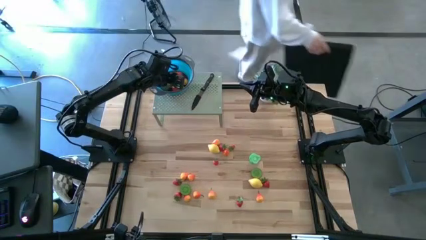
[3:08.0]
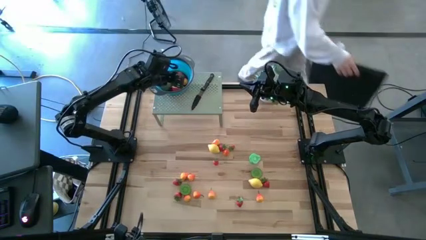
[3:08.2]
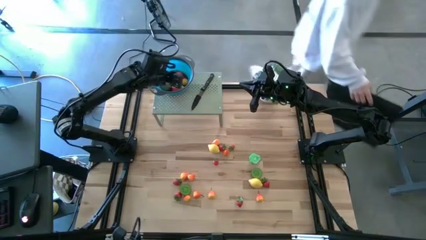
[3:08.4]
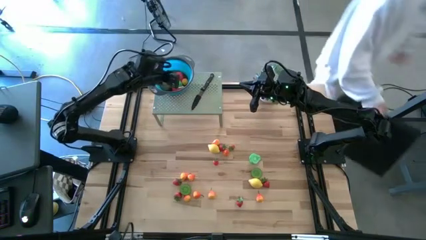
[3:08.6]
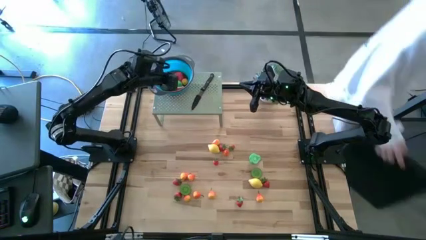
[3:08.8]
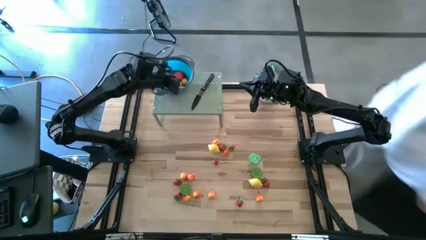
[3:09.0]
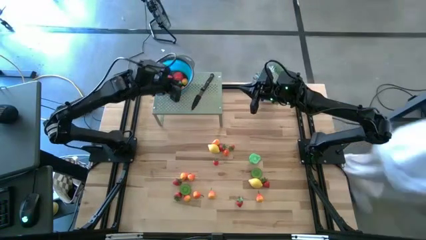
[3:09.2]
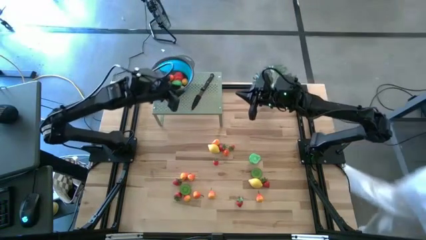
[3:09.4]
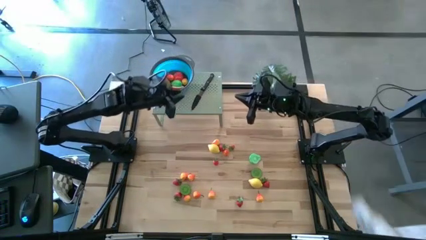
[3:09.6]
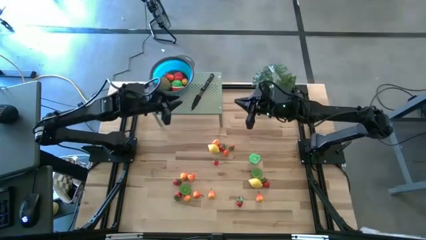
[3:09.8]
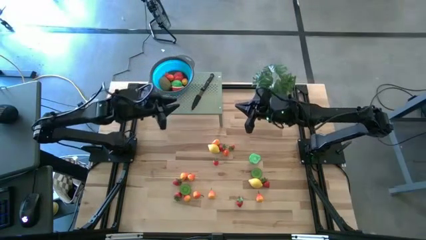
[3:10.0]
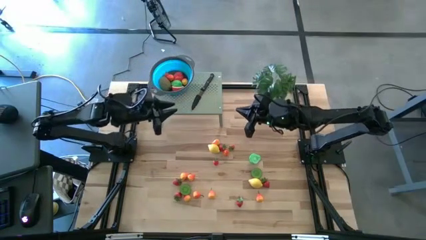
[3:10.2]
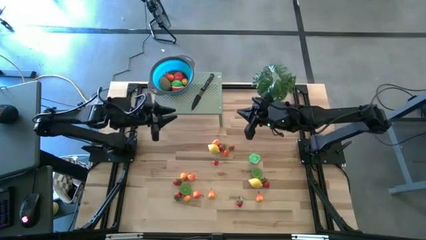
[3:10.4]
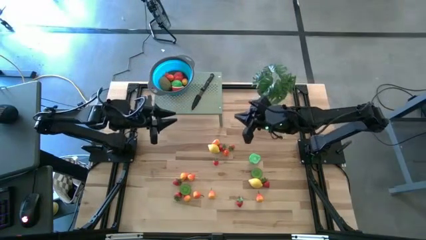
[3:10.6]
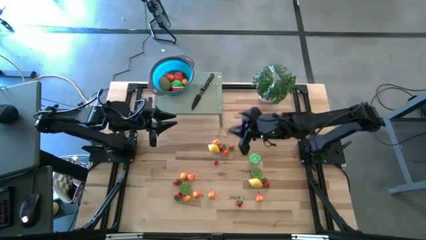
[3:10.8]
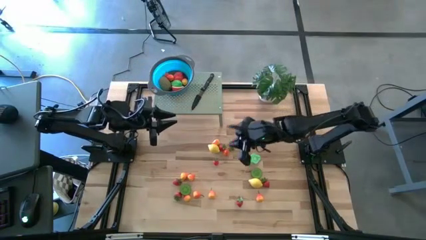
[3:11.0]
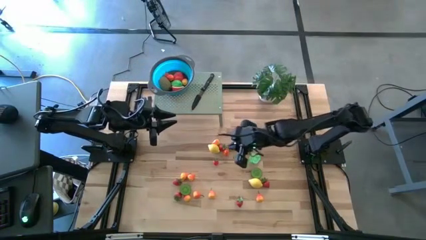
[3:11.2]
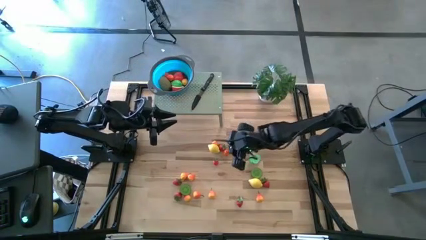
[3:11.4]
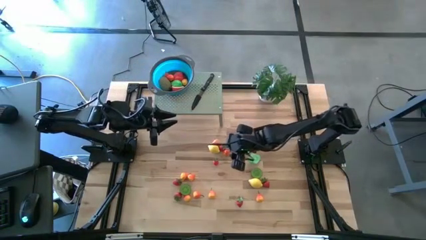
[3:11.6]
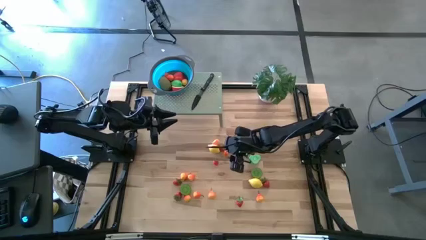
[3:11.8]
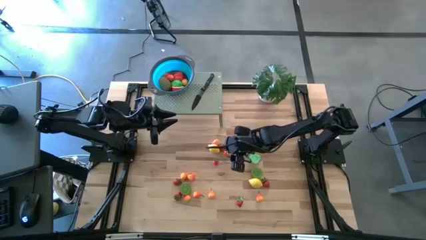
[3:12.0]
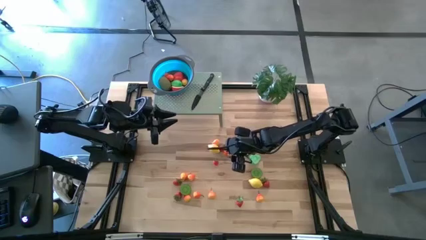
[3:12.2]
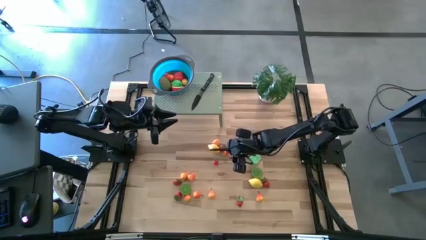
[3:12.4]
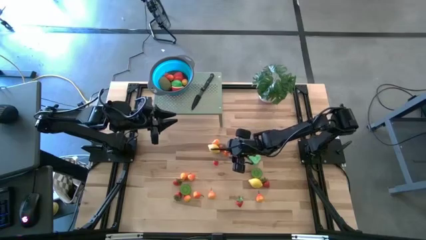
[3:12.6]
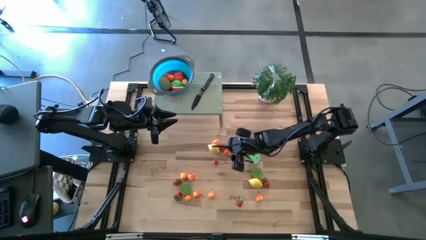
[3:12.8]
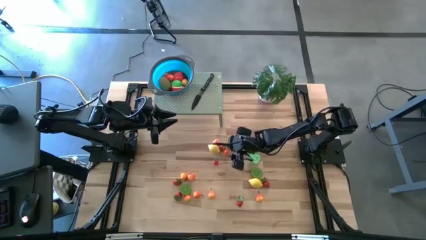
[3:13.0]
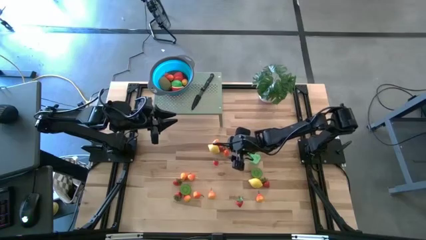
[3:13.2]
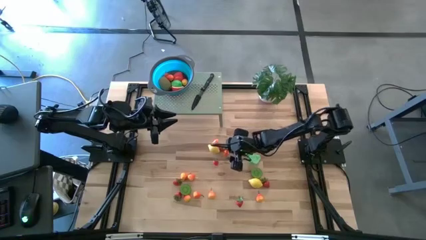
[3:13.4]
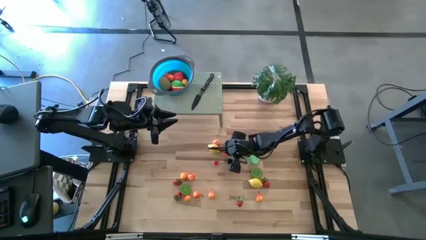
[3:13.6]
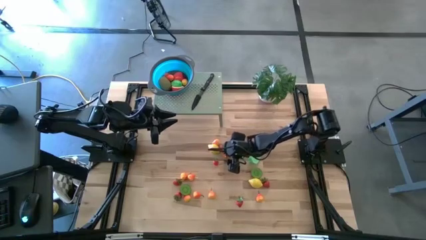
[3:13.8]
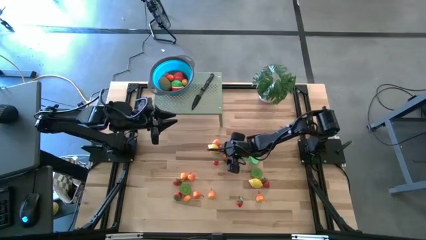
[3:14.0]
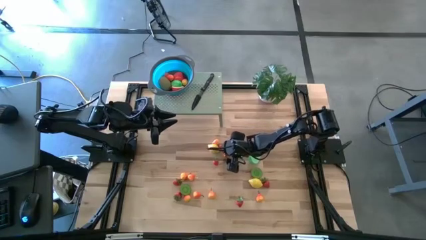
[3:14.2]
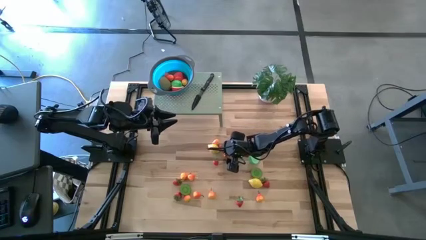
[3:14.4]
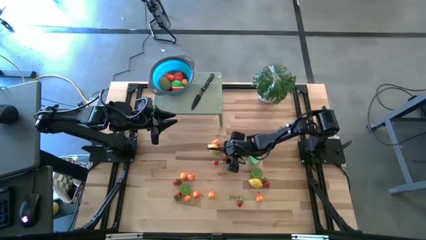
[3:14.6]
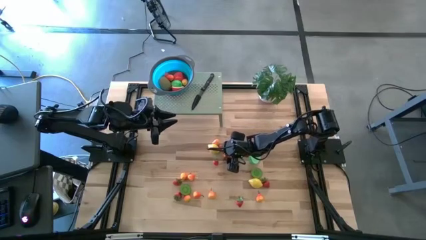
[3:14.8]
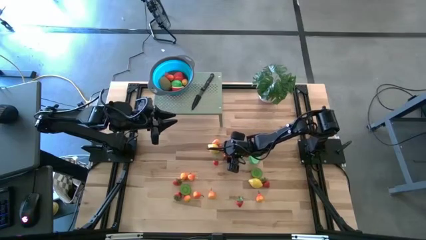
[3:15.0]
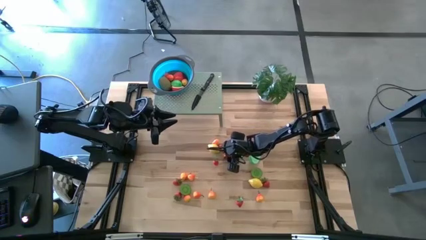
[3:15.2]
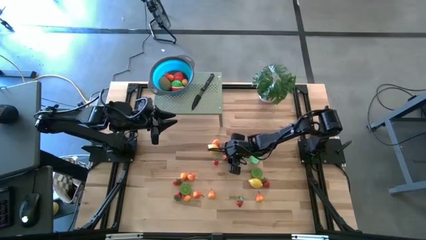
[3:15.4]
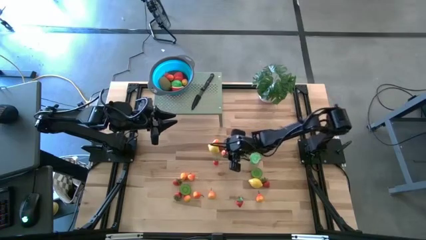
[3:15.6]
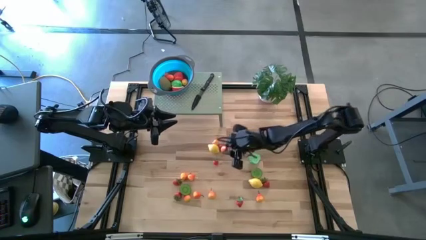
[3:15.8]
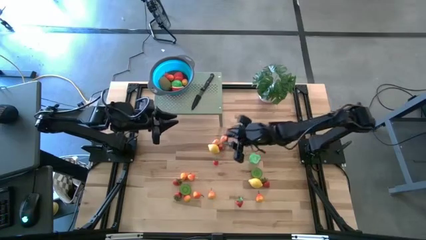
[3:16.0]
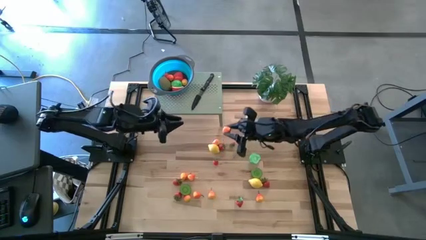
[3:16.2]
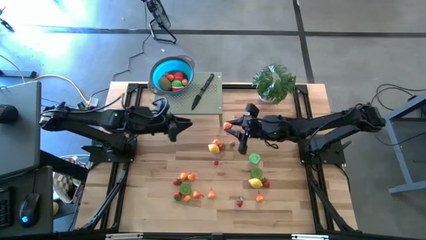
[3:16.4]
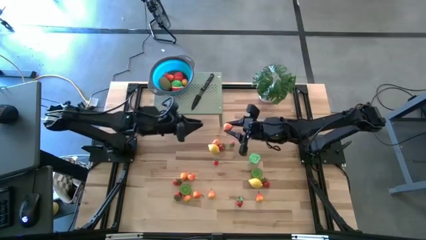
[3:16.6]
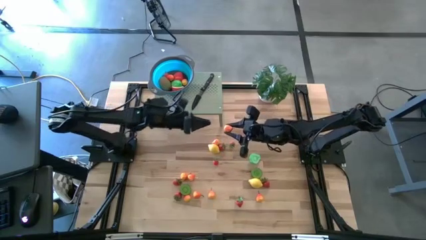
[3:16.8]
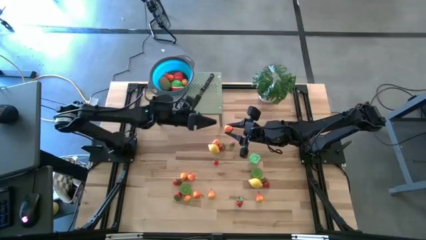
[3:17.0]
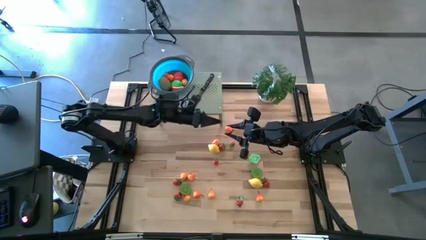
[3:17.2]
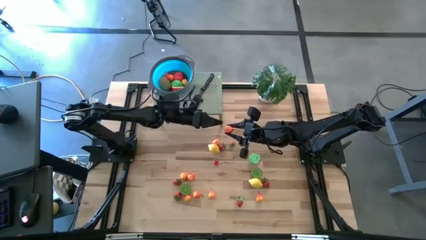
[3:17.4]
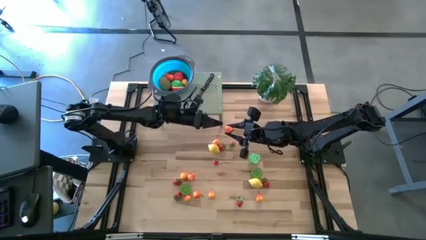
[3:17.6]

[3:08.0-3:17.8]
Task: Pick & Place Fruit
Put the orange pear into the strainer bowl on the shelf

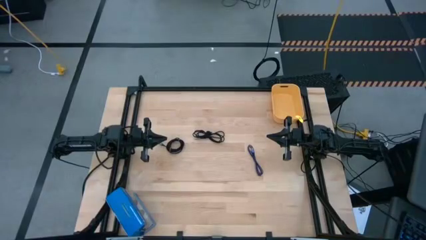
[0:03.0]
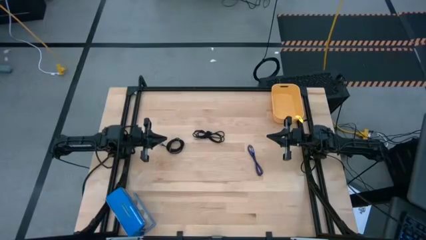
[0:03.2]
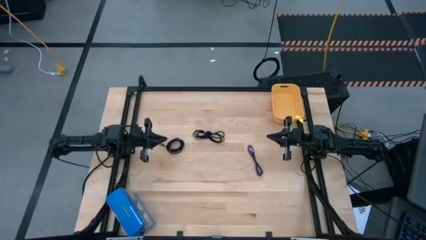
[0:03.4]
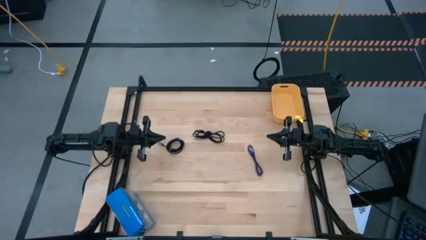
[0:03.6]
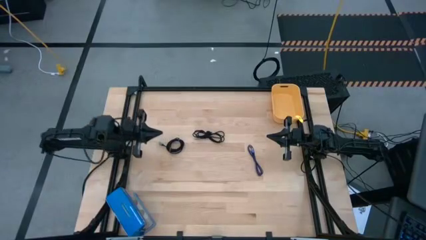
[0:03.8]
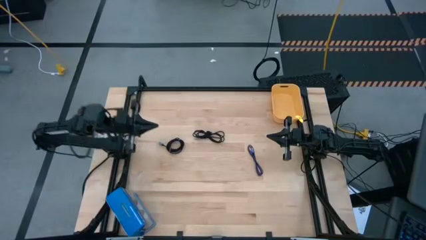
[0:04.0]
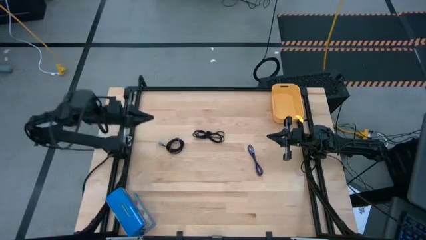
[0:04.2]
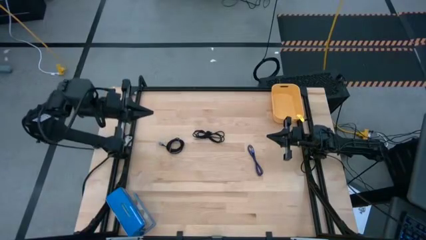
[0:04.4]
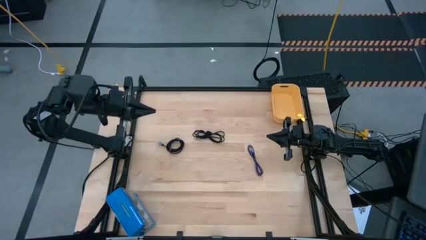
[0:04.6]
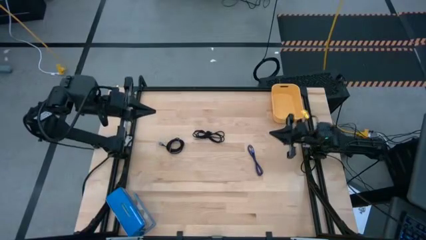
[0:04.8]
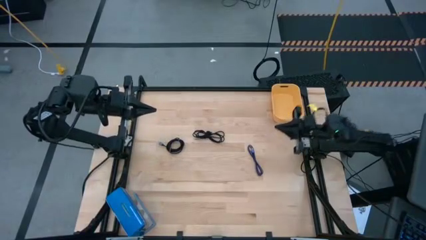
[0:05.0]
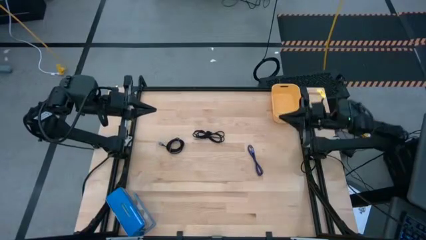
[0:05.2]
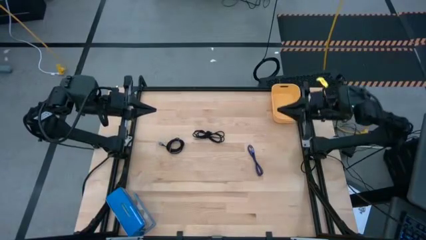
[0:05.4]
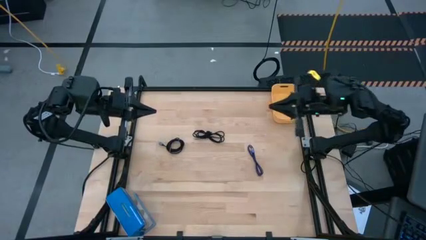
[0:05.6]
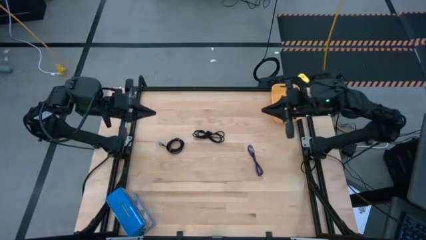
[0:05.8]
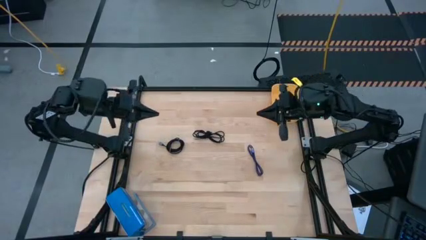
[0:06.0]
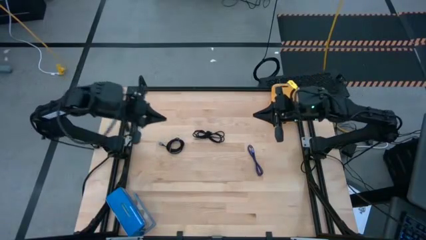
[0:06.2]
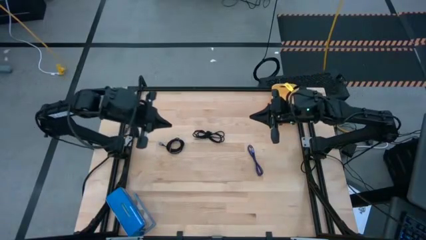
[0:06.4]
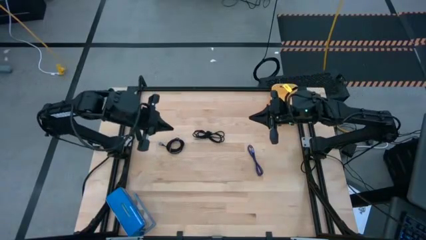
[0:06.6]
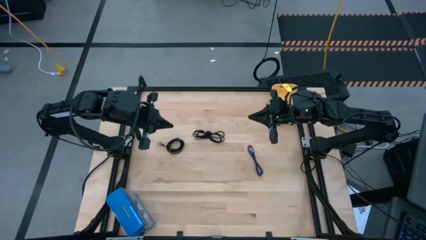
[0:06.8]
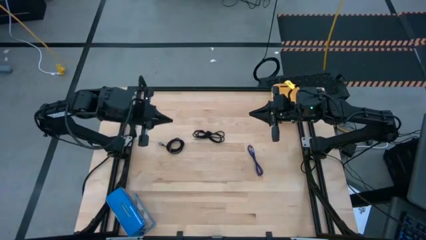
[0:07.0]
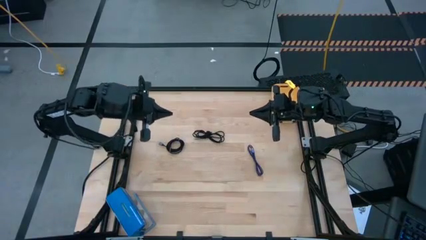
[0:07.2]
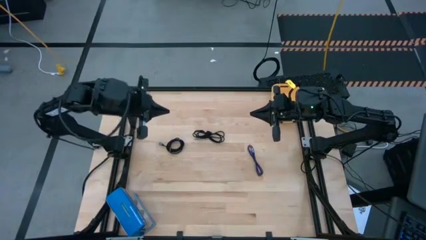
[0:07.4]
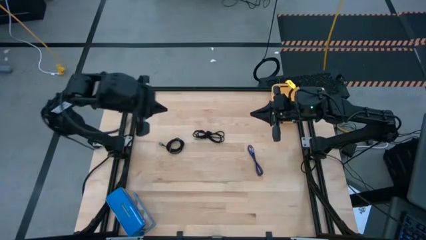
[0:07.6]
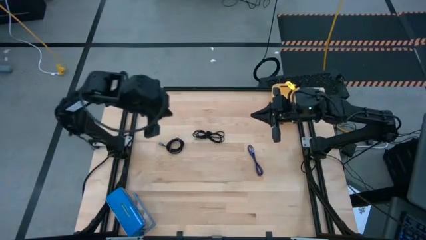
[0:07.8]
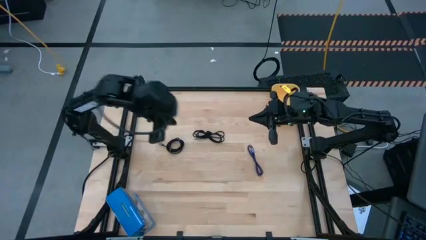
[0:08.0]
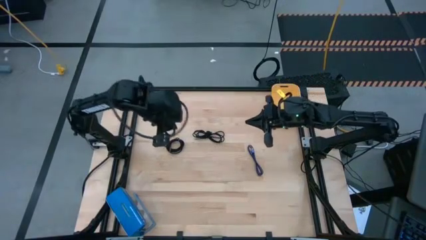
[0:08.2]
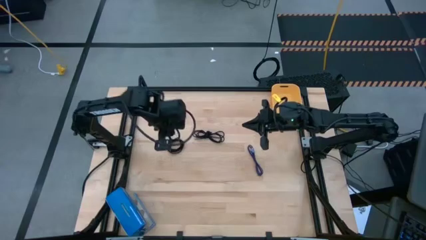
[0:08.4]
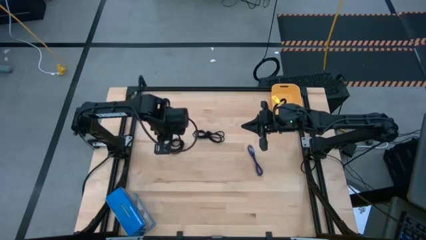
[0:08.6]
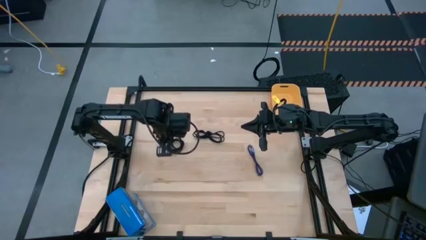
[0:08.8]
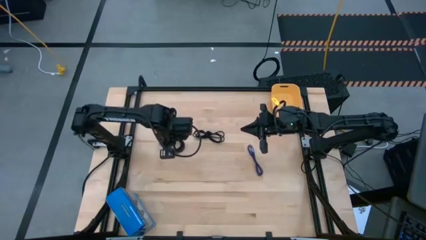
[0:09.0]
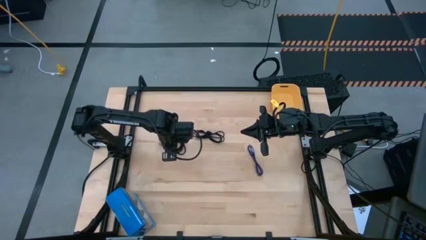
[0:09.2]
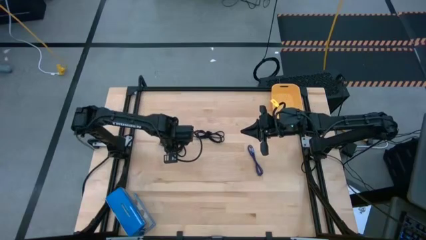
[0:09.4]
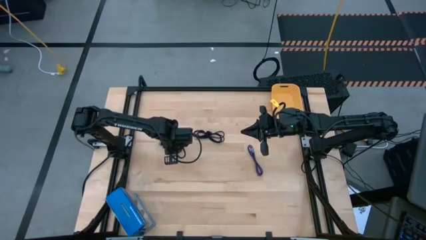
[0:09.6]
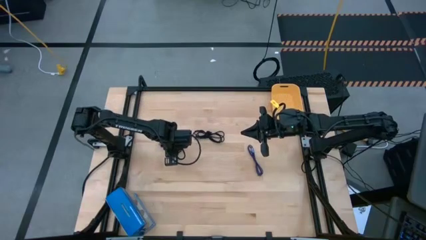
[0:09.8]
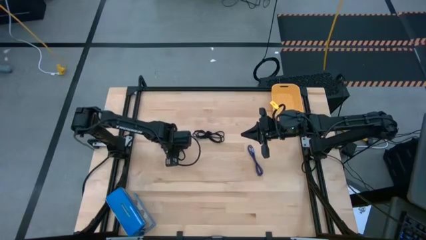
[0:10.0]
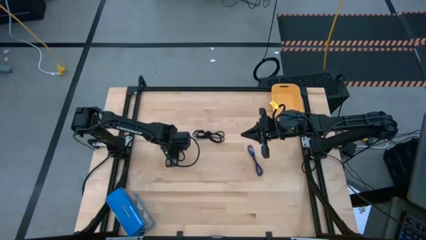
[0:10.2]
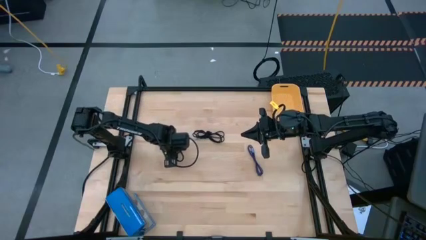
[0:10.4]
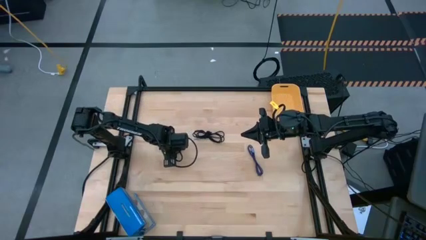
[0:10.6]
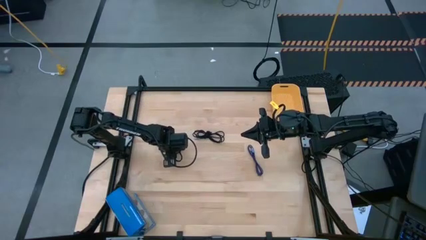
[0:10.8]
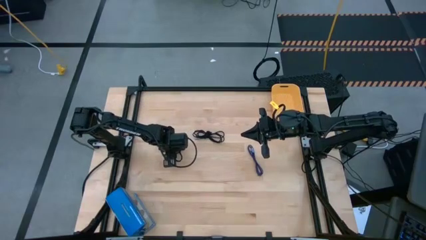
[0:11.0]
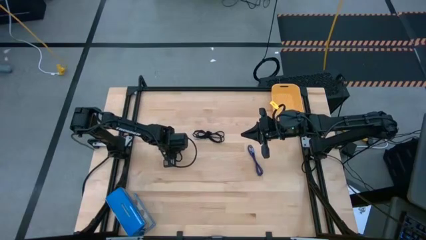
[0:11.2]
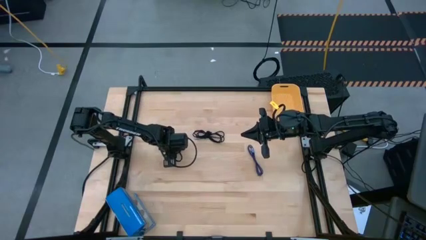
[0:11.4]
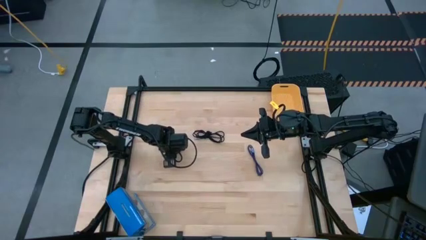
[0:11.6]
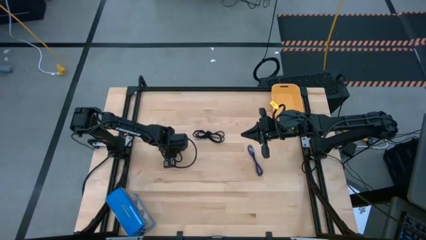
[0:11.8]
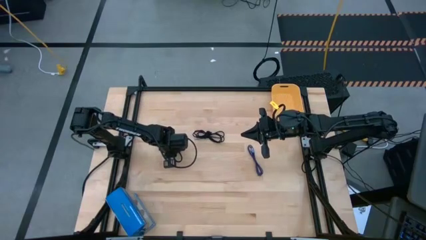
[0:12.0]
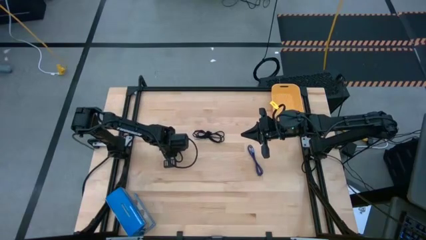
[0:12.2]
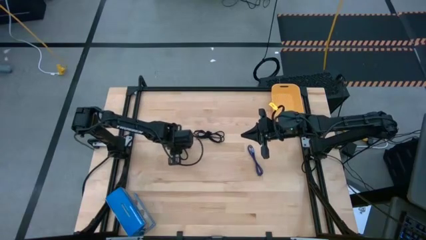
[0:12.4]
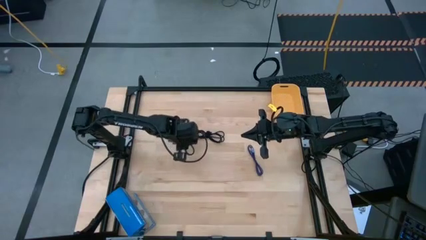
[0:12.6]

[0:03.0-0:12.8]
Task: Pick and place USB-C Cables
Put the left black charger cable into the yellow bin
